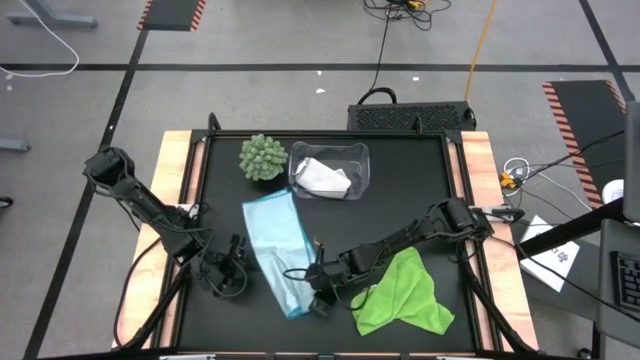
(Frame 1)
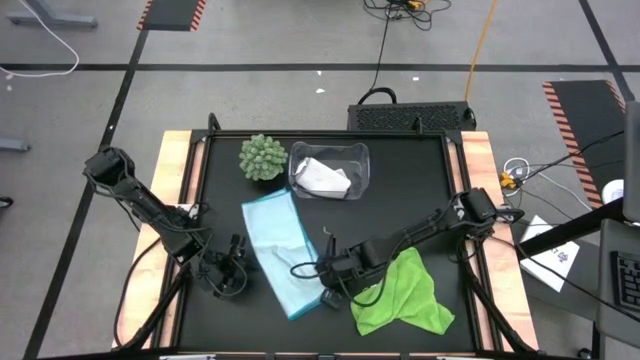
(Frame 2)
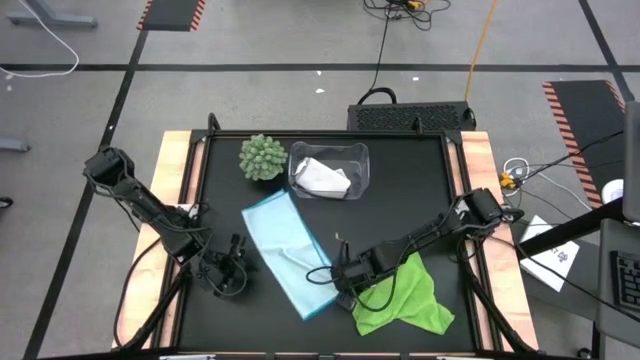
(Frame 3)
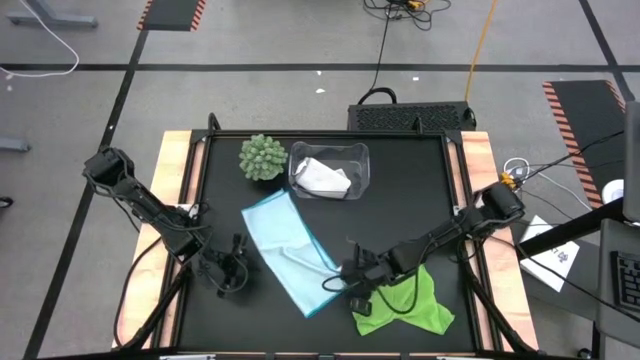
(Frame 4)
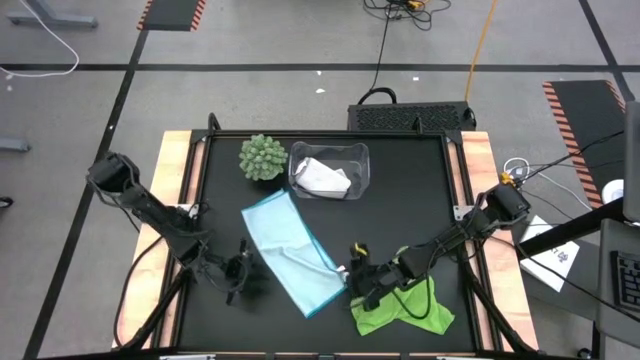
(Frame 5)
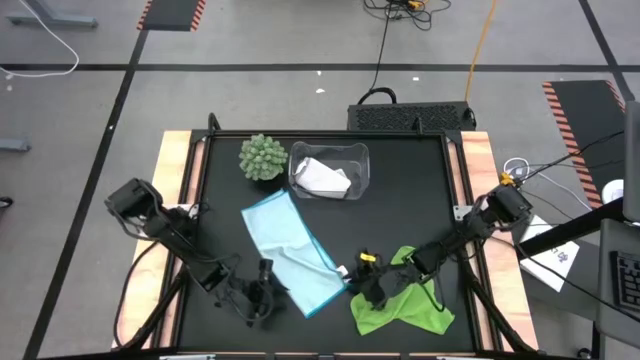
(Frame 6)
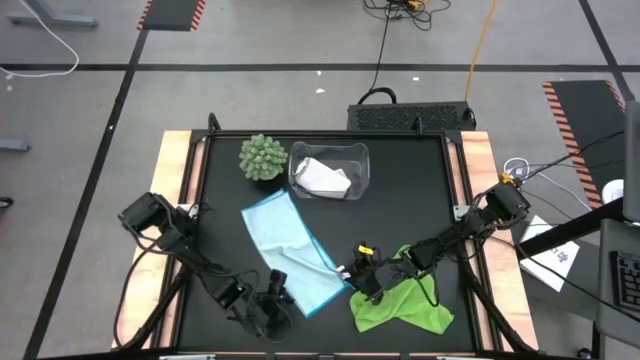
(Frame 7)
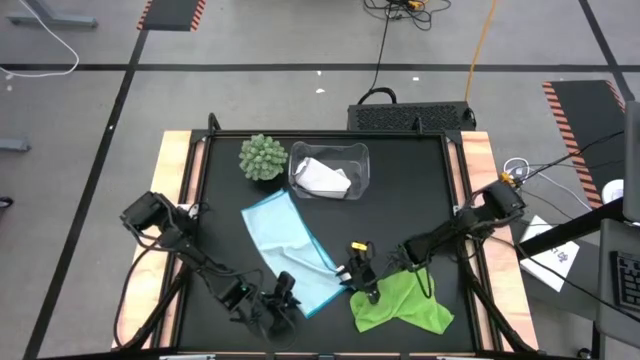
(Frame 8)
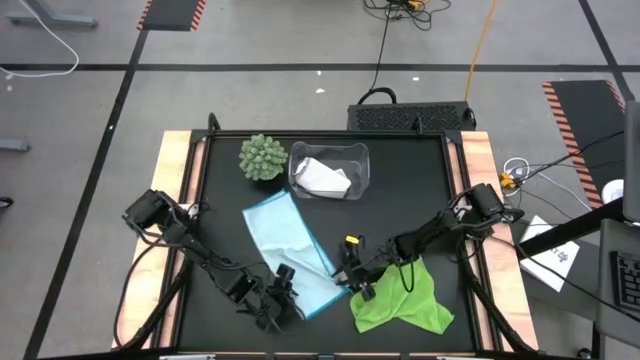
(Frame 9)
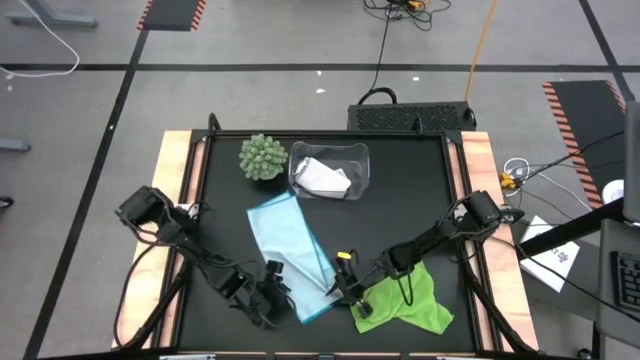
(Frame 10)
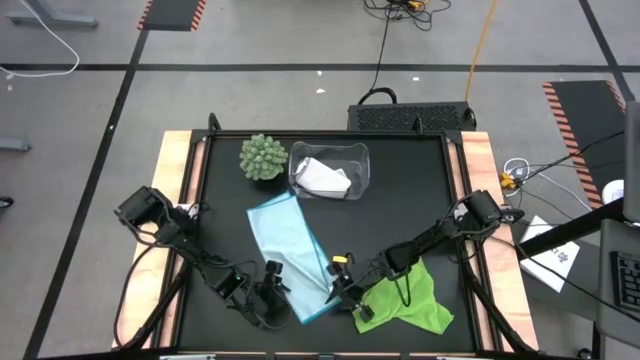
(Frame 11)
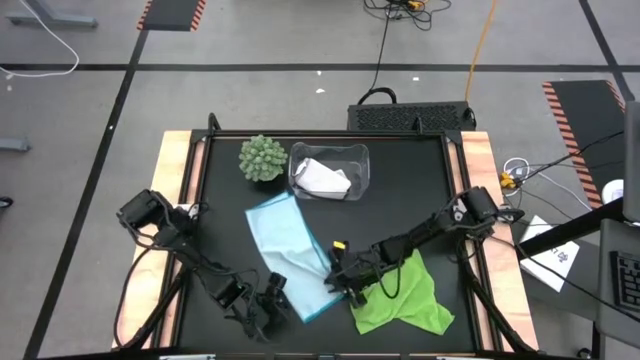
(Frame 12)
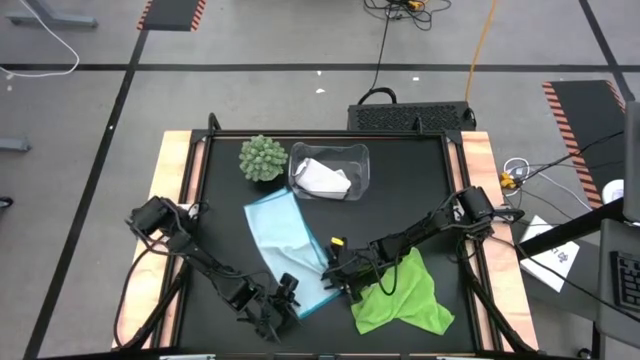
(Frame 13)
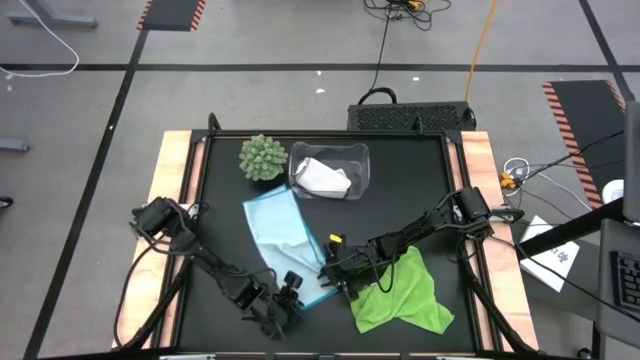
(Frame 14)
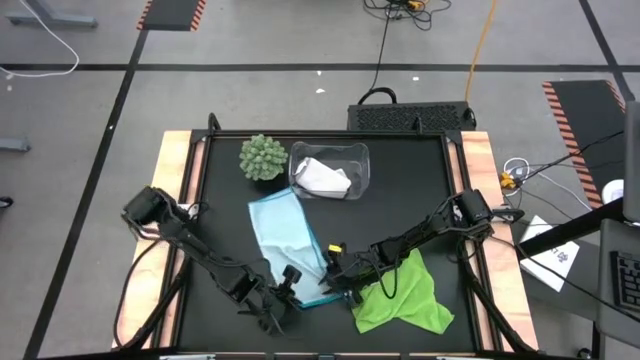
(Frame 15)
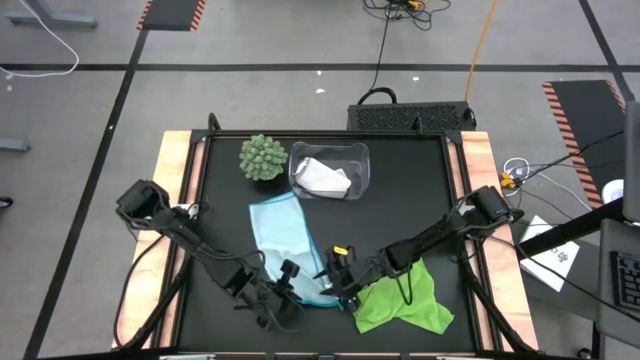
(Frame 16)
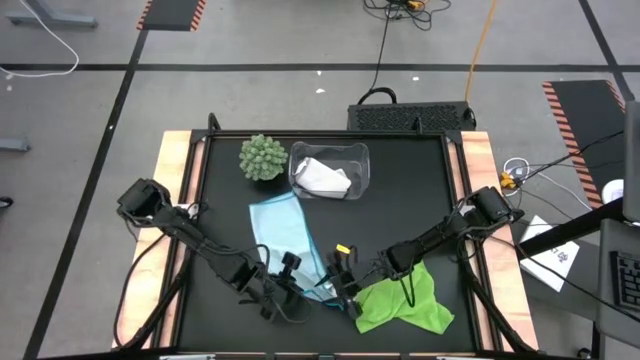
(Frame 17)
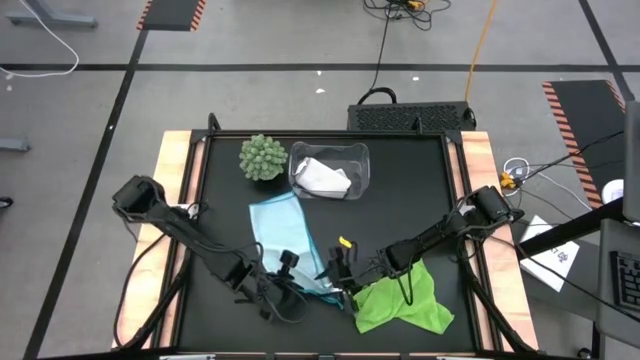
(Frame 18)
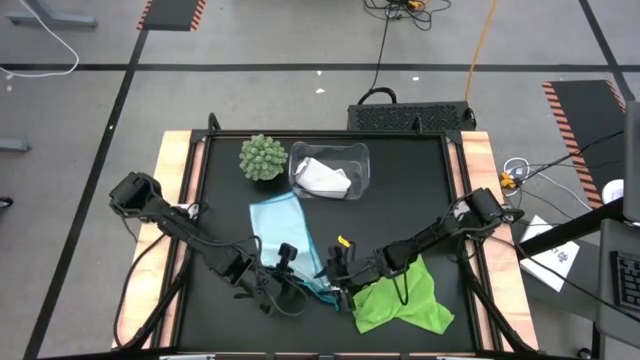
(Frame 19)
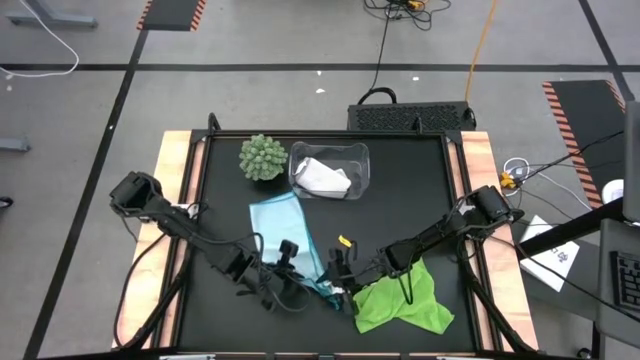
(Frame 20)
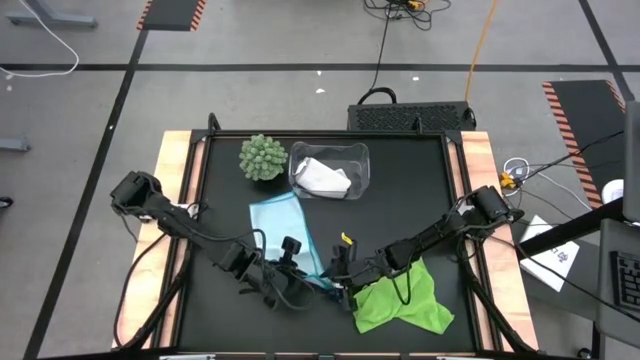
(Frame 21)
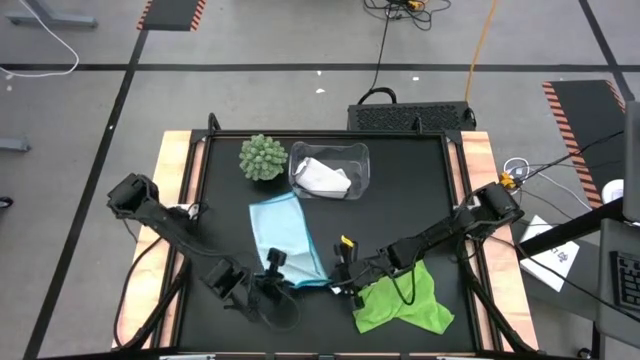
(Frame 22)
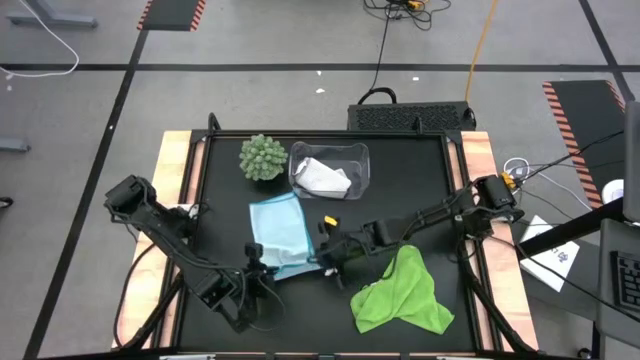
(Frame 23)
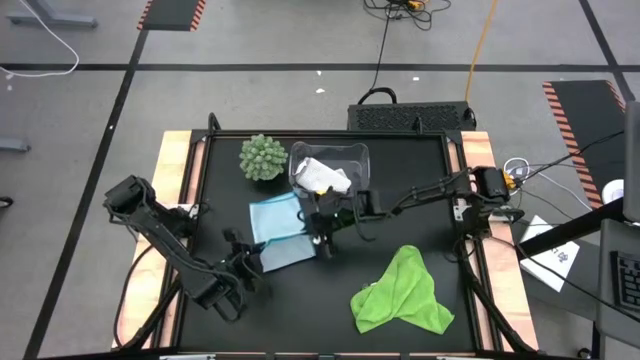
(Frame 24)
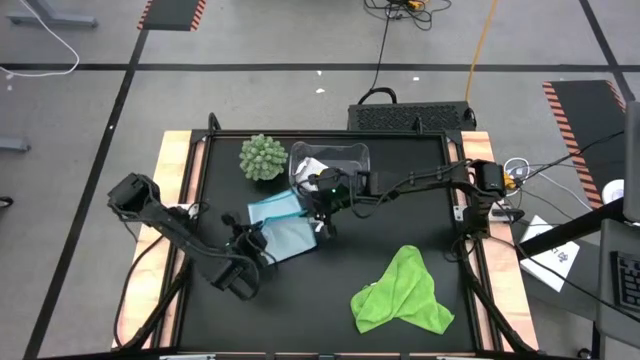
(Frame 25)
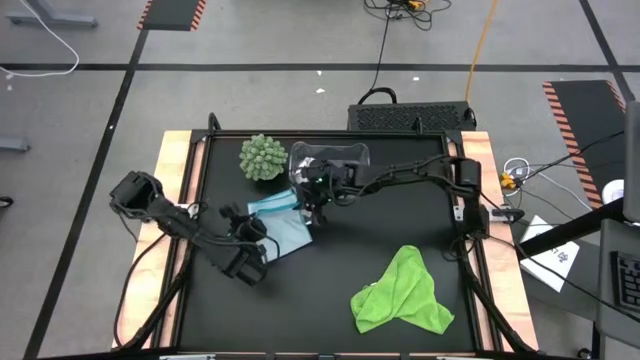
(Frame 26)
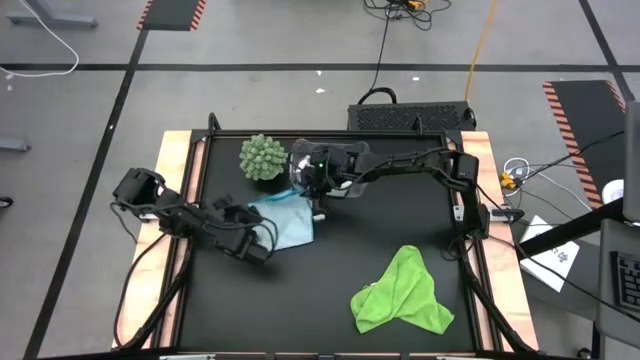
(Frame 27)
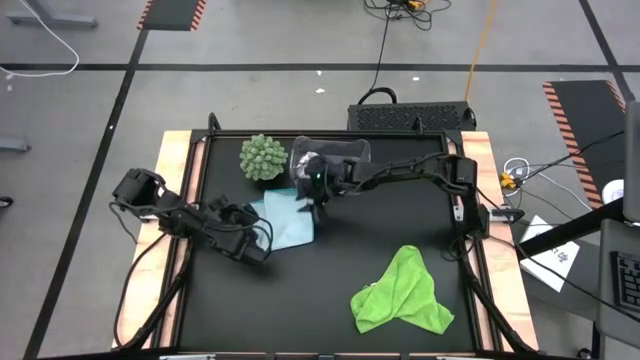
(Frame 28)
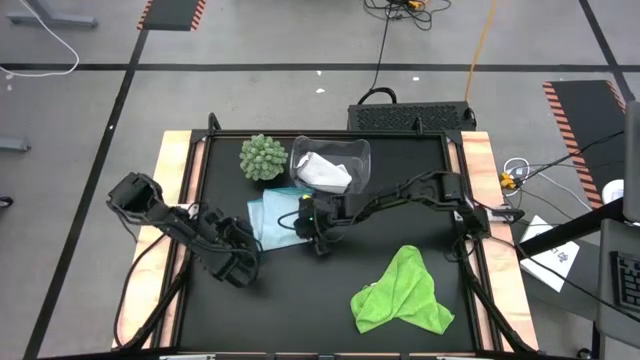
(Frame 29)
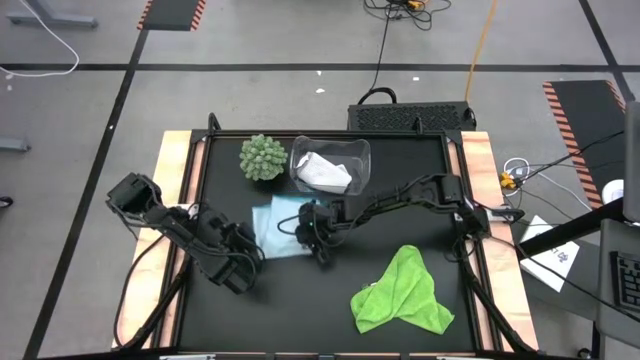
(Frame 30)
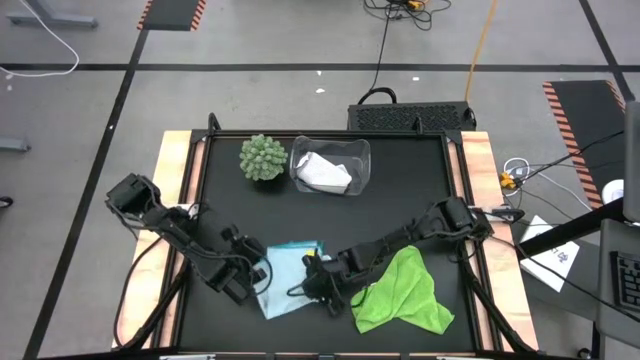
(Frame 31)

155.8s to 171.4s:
Task: Fold microfiber towels
Fold the blue towel

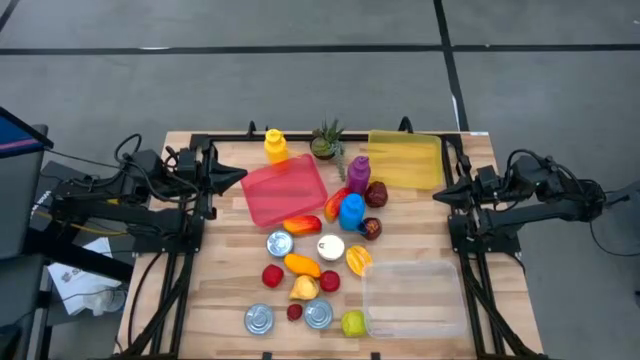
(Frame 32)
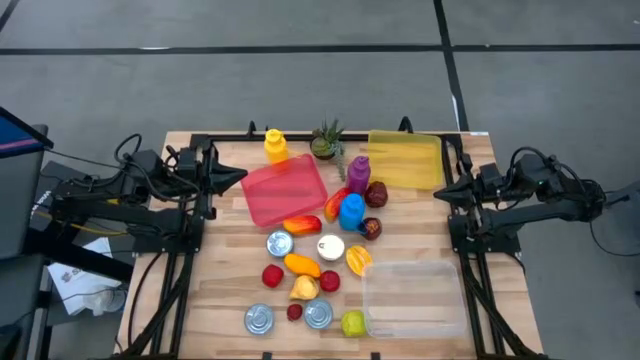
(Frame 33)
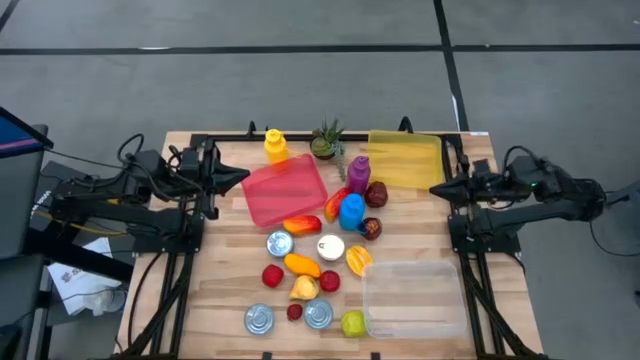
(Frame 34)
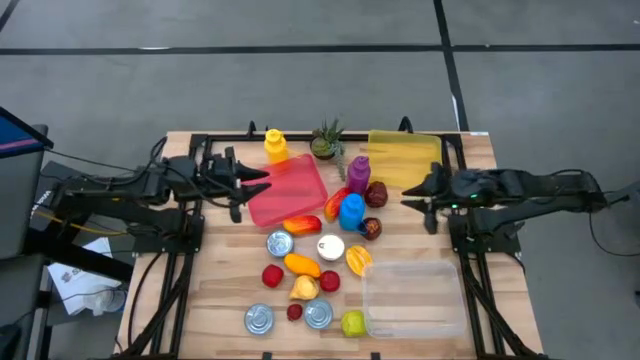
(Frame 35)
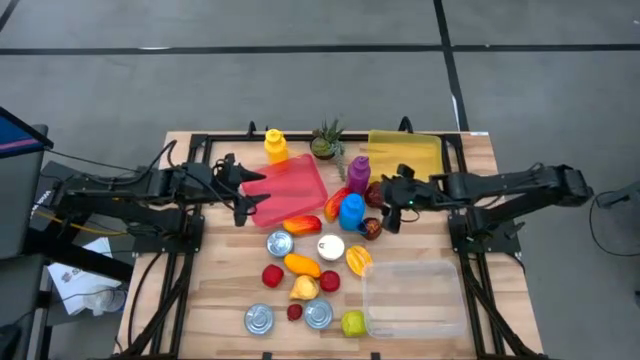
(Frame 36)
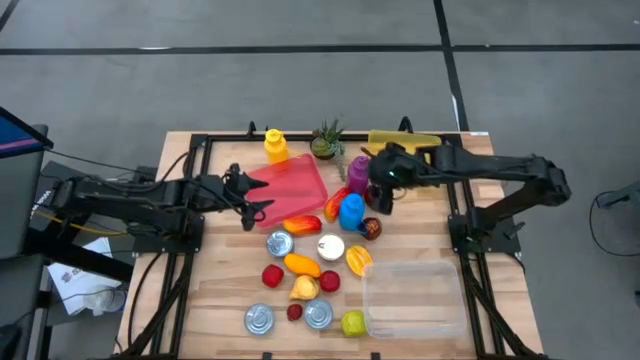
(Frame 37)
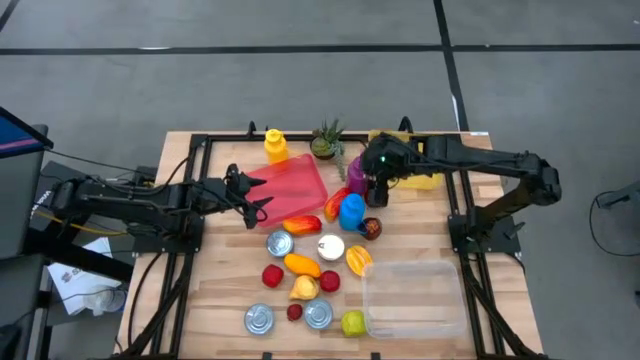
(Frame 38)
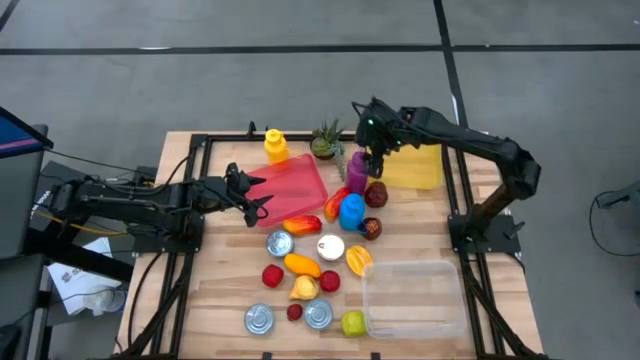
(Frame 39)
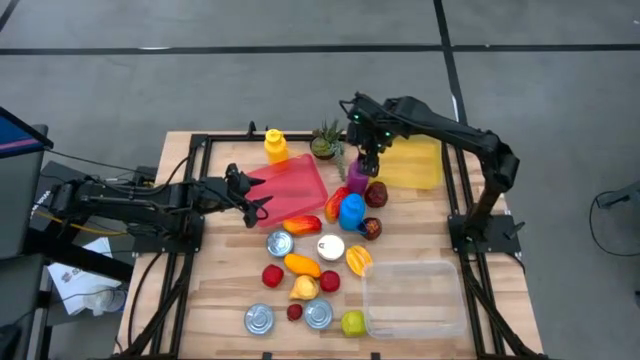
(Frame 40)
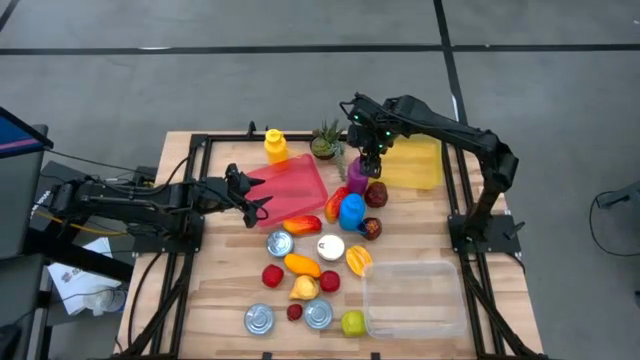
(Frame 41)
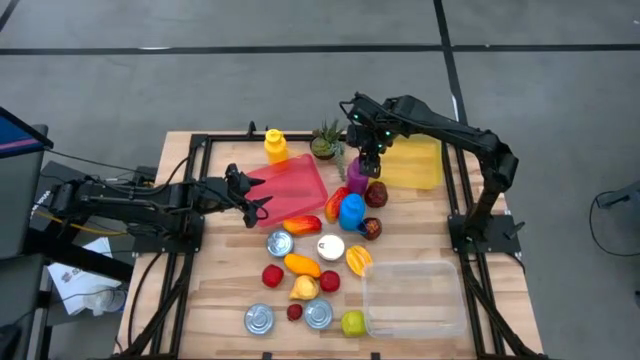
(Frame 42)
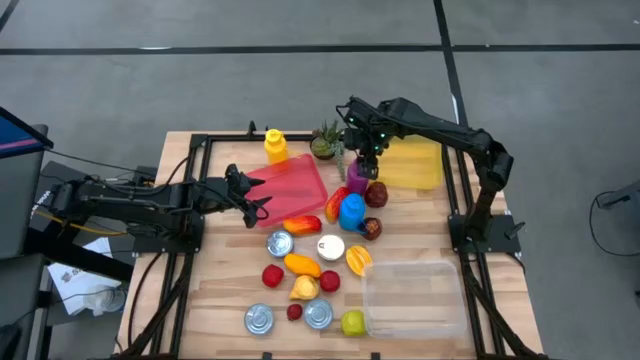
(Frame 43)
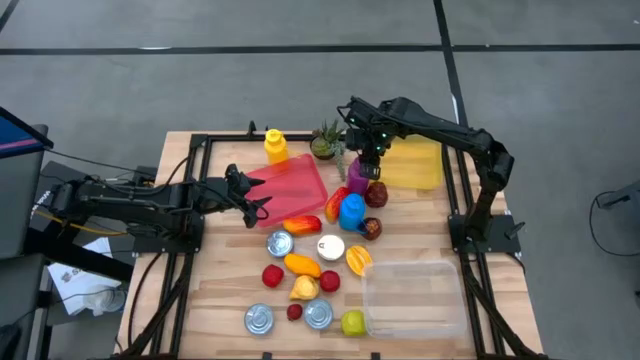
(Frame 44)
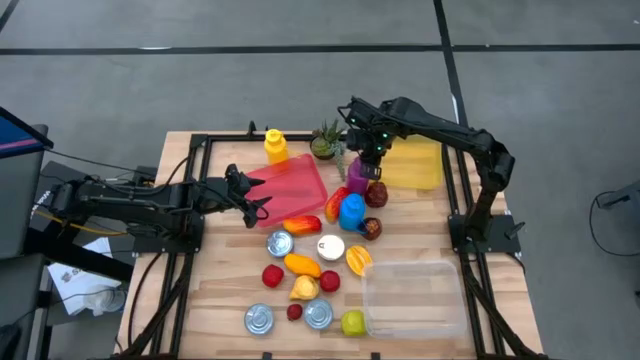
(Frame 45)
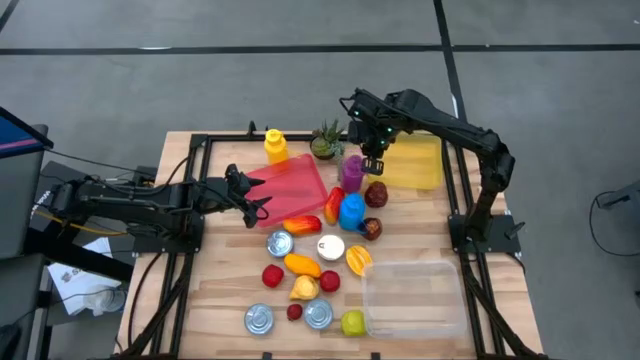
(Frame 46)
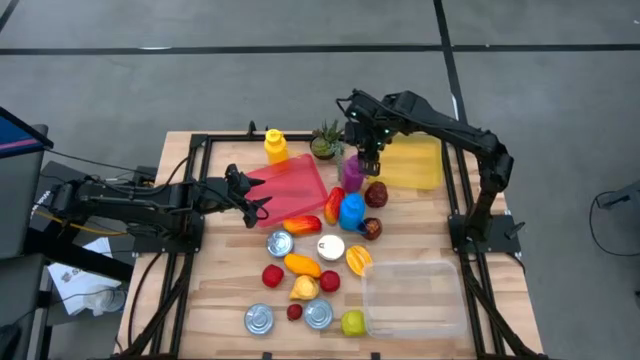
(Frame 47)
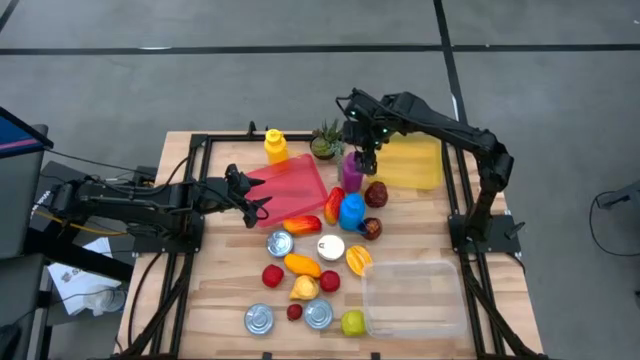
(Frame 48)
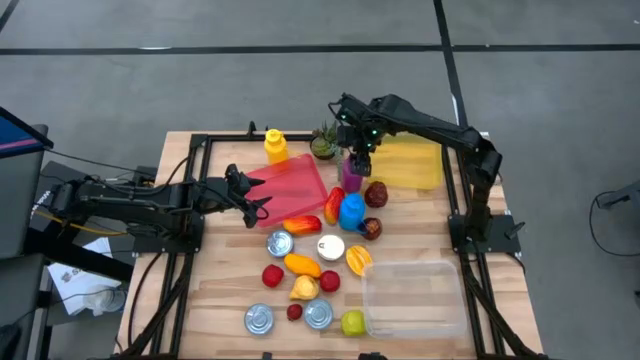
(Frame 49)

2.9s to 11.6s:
Task: Pick & Place Food Item
Put the purple water bottle into the yellow bin
